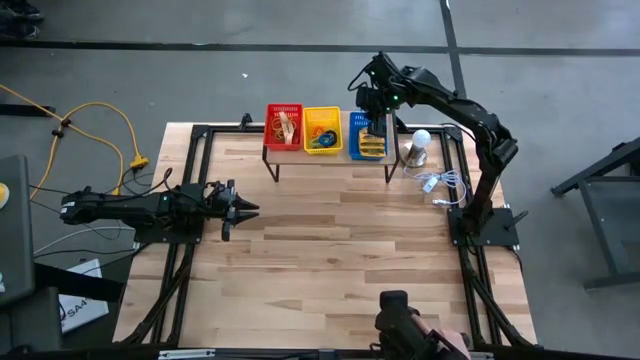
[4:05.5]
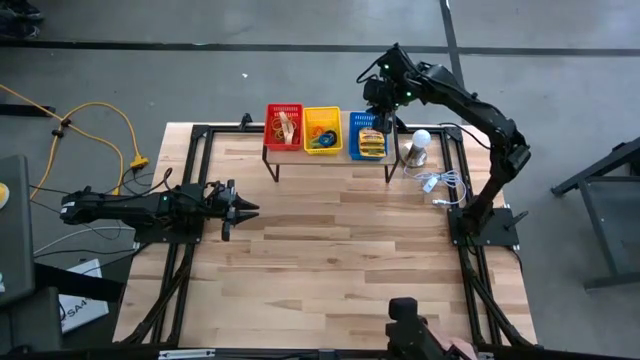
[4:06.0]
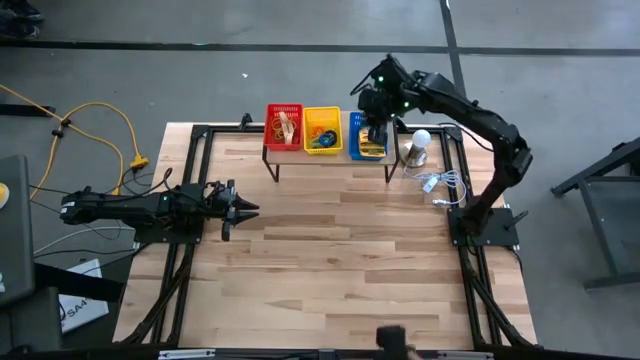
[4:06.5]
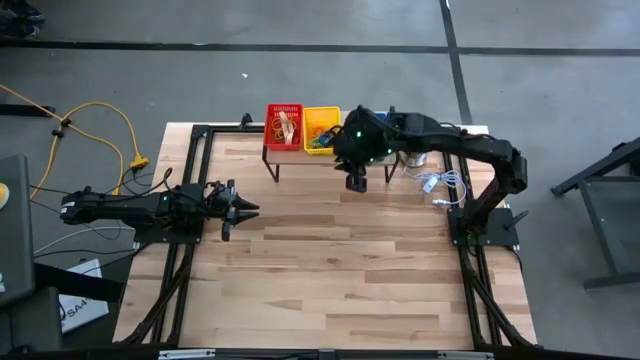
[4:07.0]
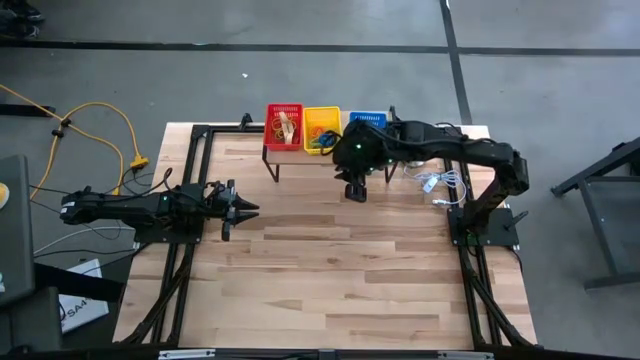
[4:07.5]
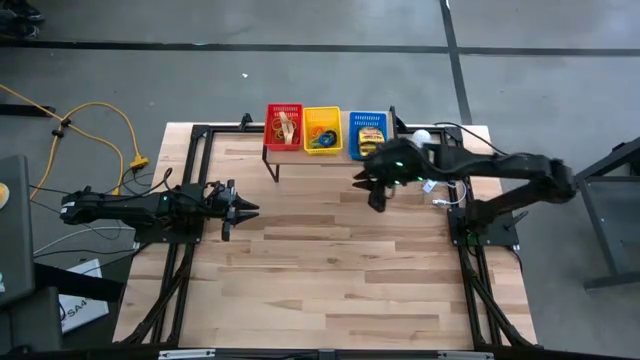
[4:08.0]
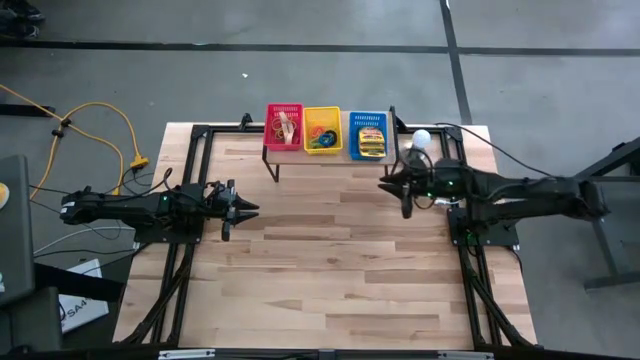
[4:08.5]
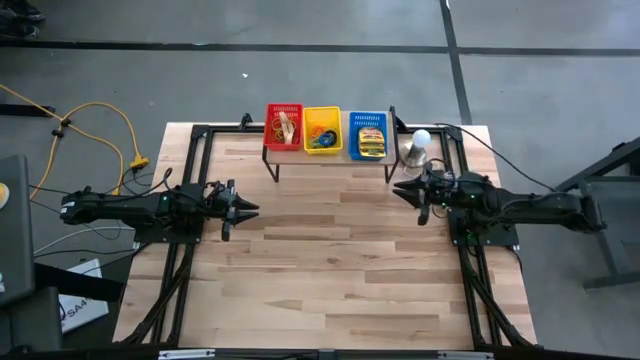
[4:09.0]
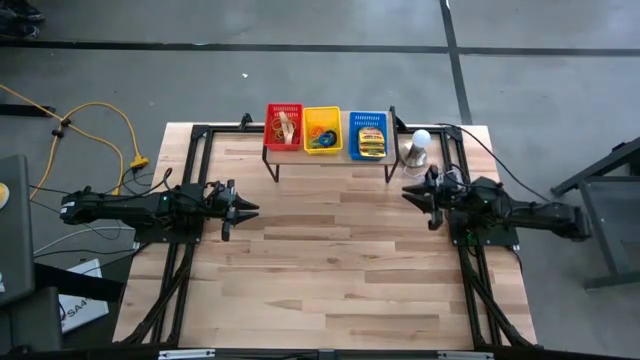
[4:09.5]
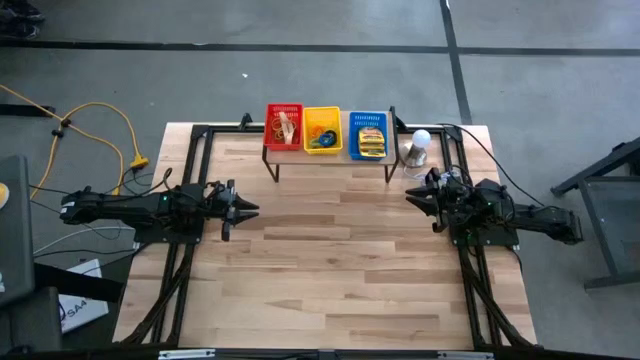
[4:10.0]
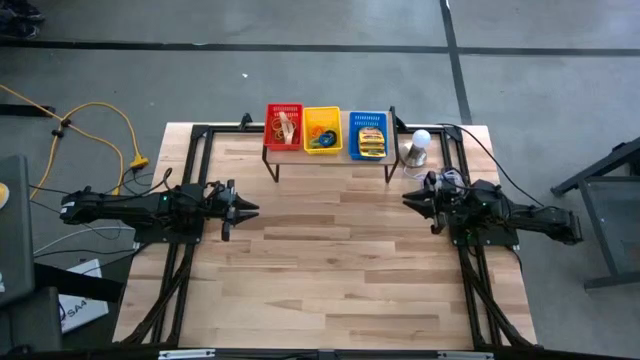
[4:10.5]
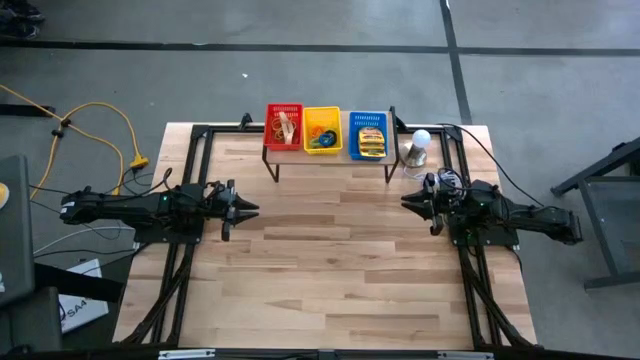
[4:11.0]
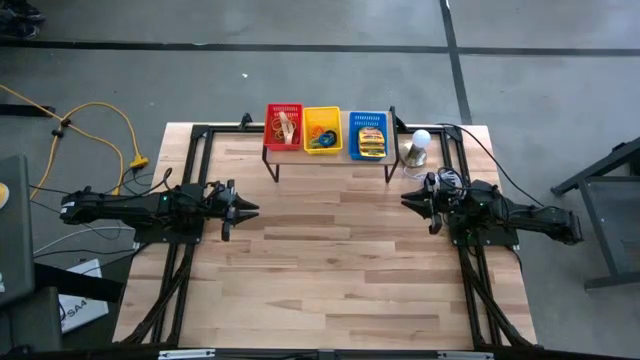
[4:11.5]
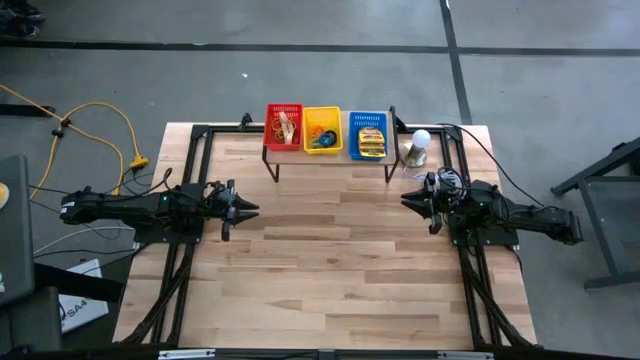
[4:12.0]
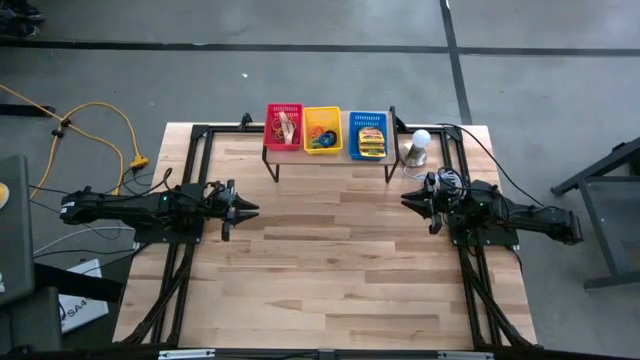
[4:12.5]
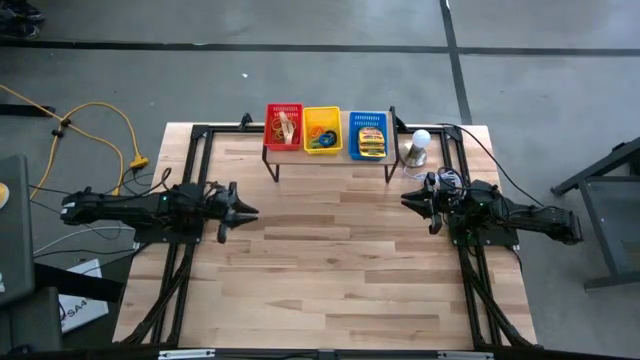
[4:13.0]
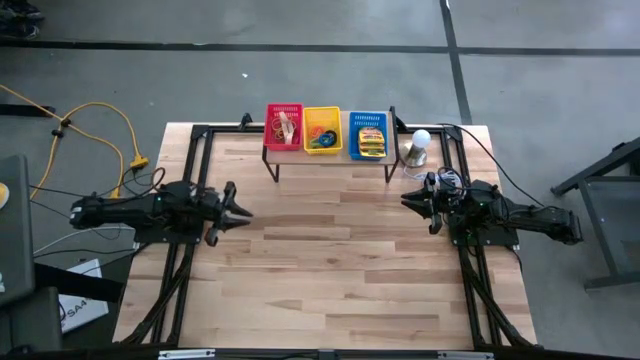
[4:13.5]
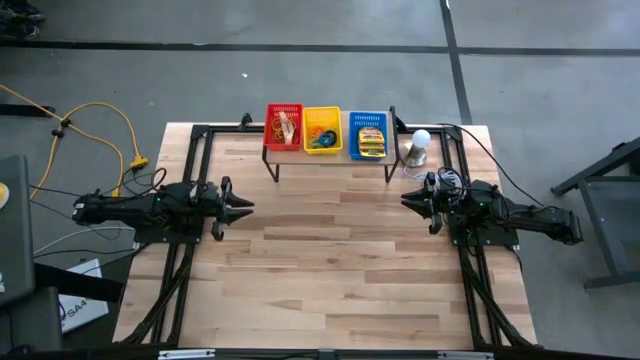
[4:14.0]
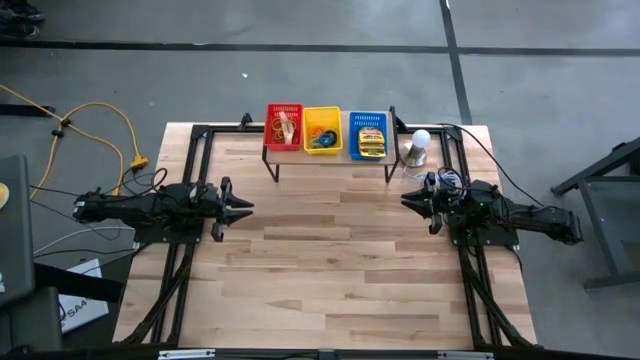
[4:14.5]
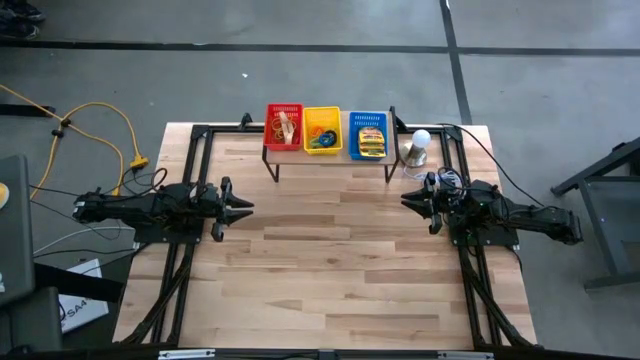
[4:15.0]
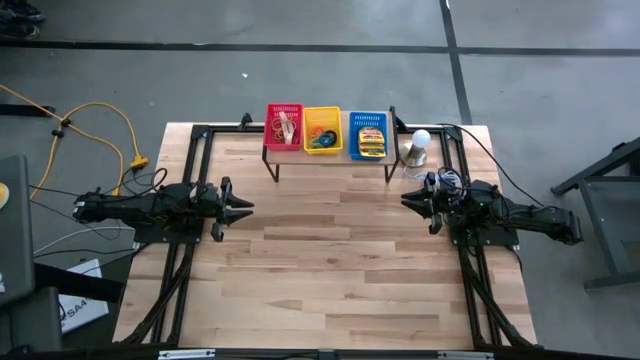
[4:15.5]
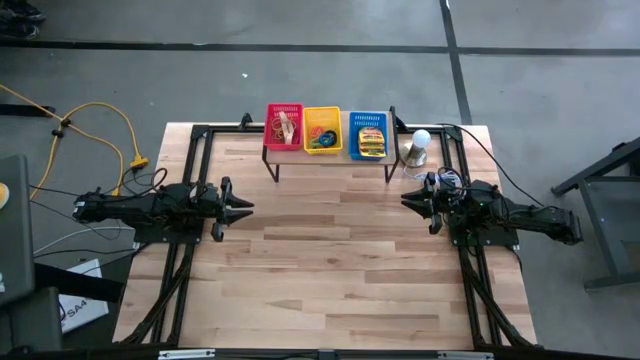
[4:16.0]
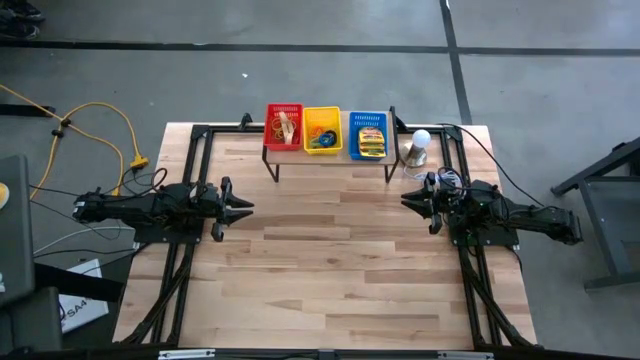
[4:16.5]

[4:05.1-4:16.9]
Task: Pick & Place Office Desk Supplies
Return to Home Position

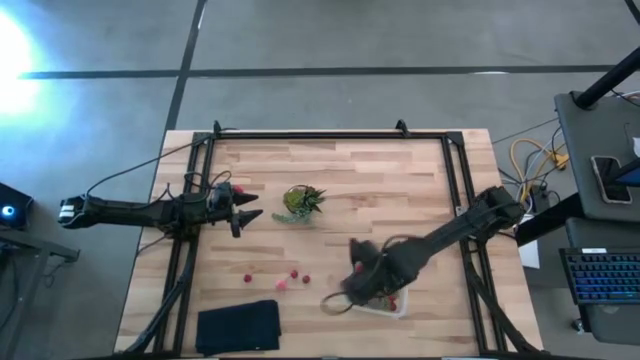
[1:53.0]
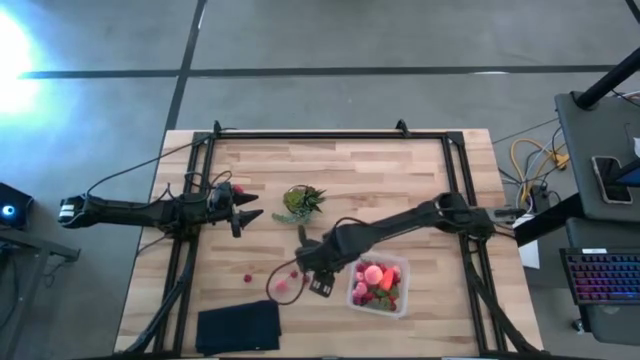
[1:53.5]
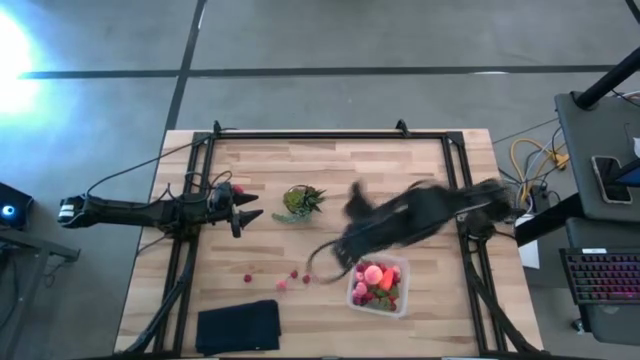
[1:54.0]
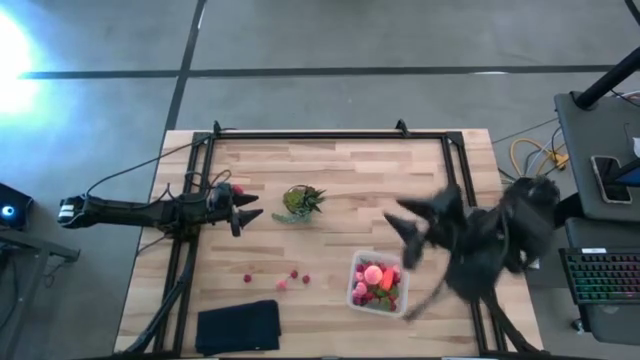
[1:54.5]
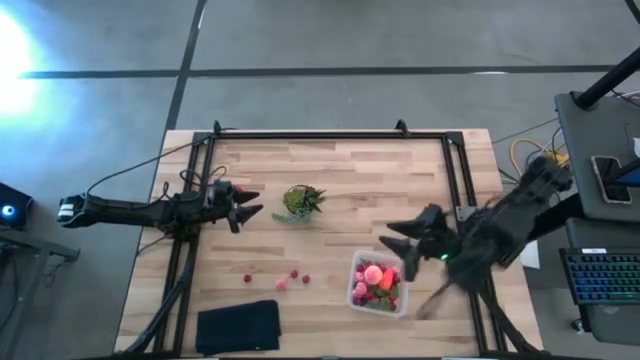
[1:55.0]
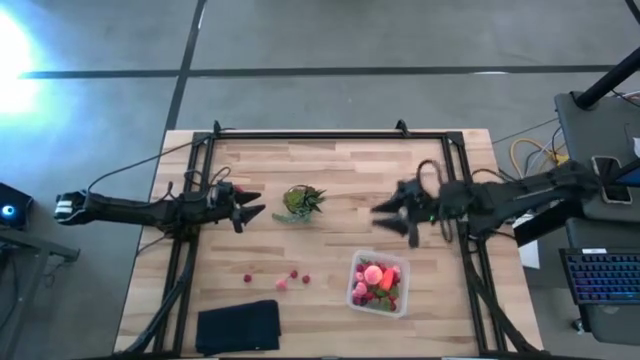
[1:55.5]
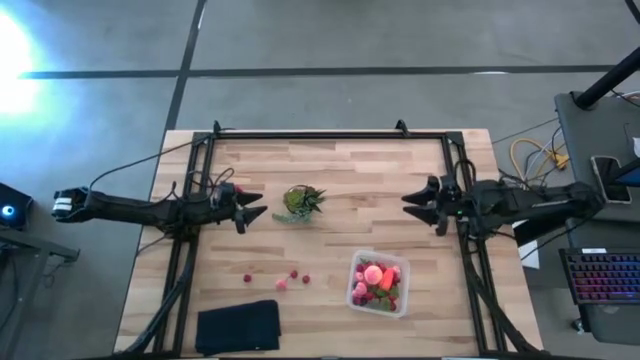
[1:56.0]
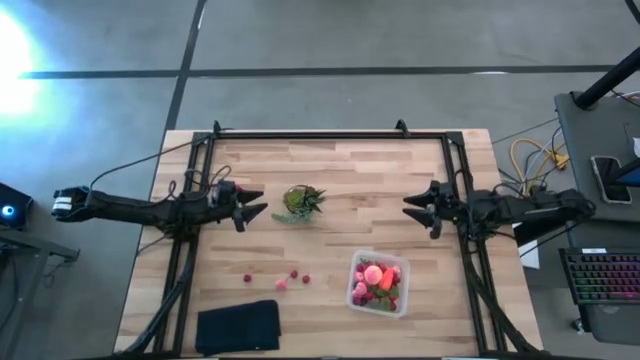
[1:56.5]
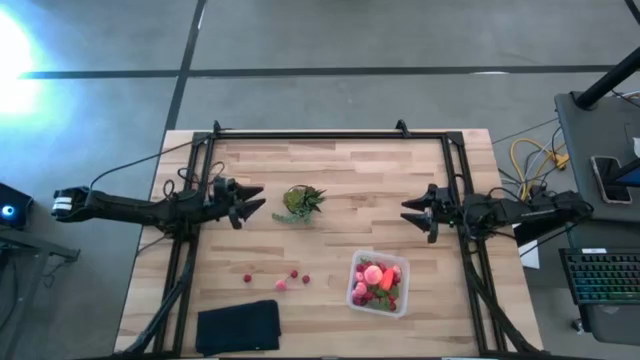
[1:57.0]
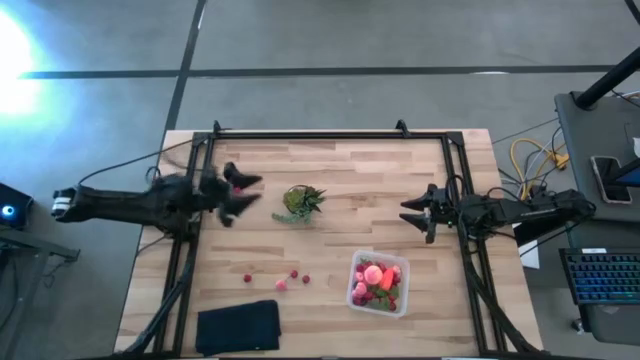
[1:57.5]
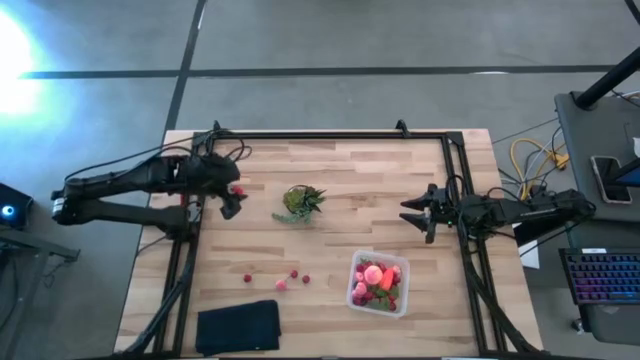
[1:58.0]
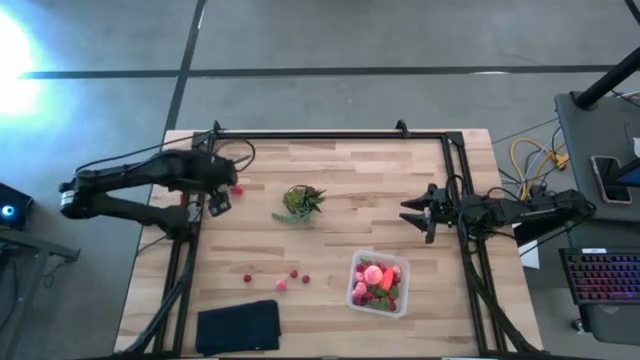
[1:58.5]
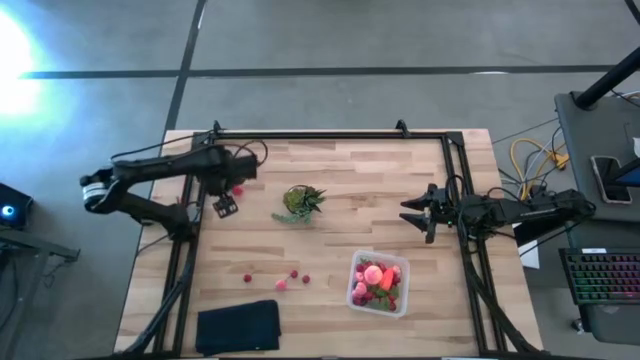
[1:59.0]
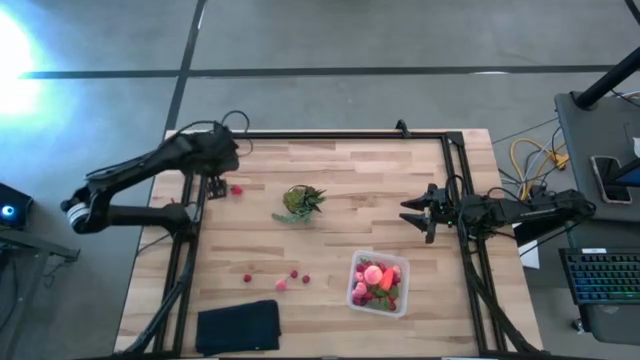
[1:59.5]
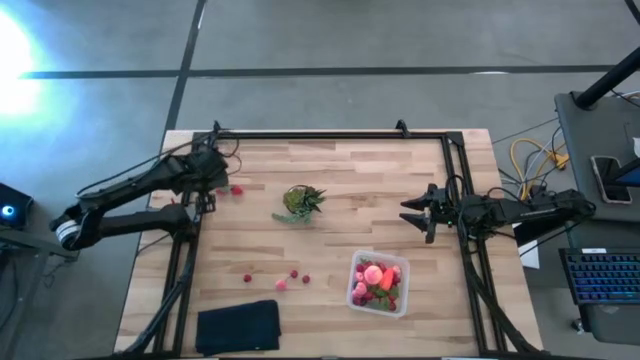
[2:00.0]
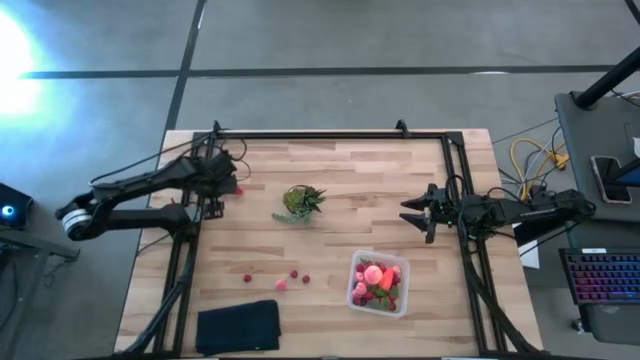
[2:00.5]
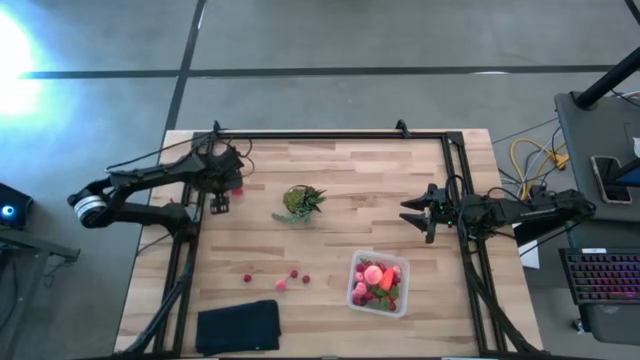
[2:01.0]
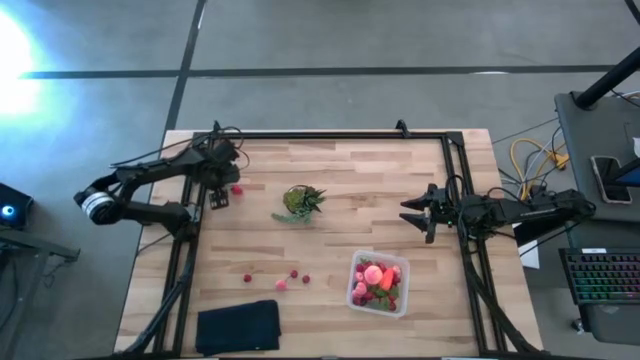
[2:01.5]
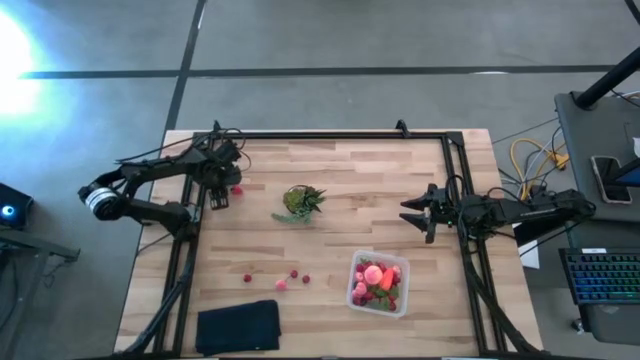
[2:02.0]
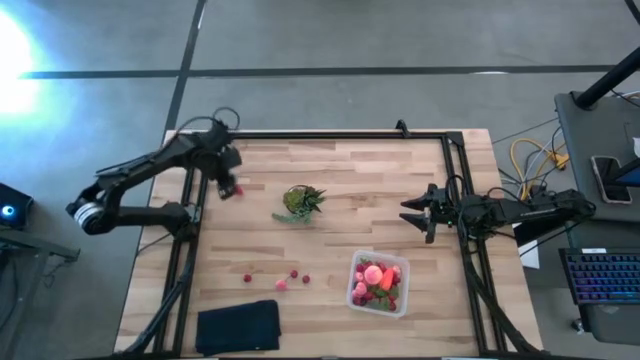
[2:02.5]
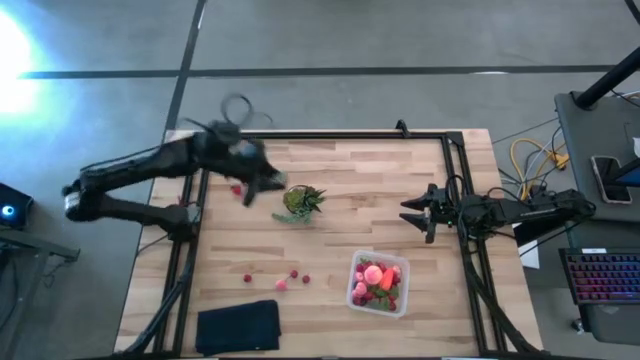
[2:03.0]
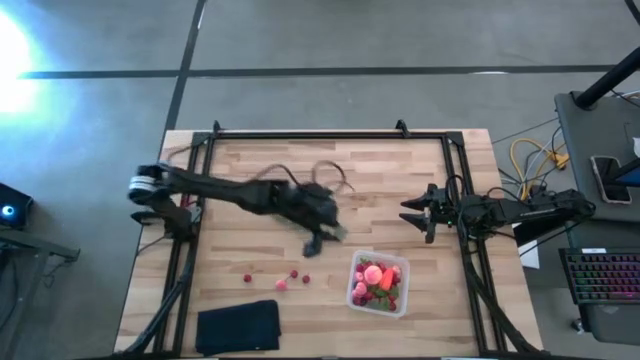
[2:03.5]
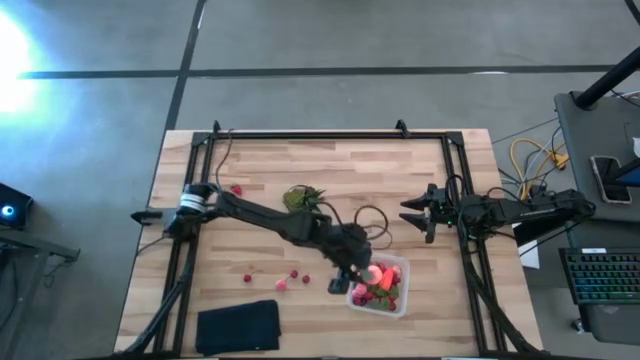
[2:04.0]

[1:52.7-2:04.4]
Task: Pick and placing Produce into tupperware
Put the left strawberry into the bin
